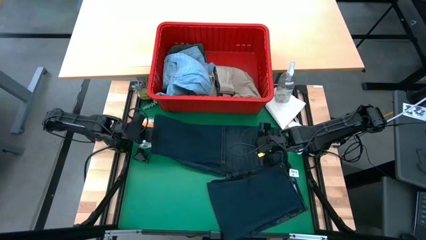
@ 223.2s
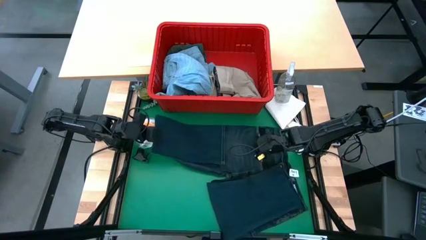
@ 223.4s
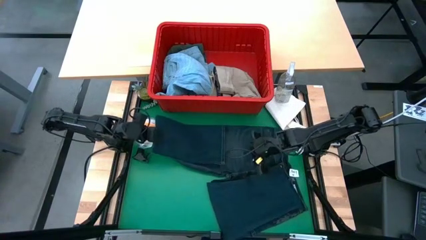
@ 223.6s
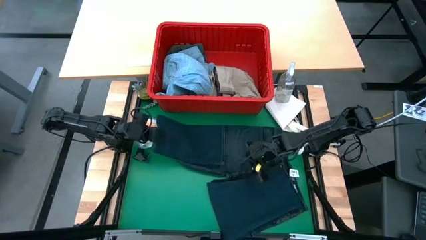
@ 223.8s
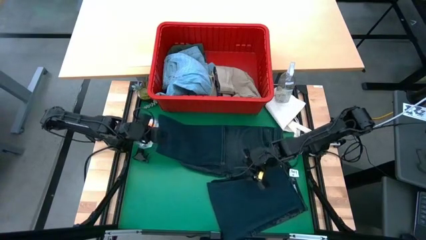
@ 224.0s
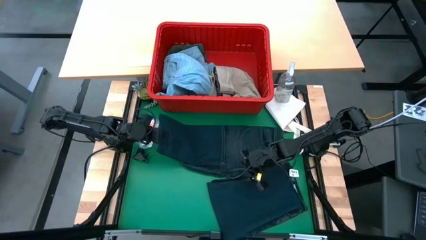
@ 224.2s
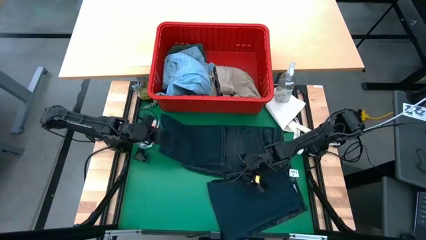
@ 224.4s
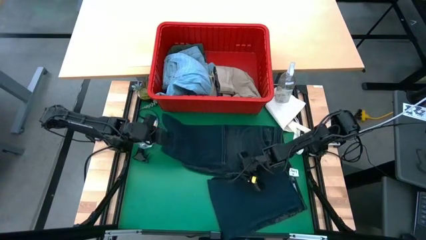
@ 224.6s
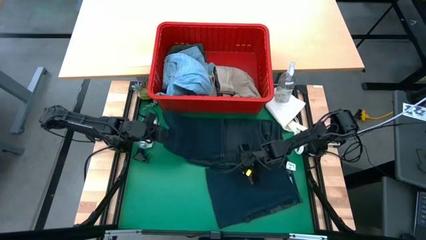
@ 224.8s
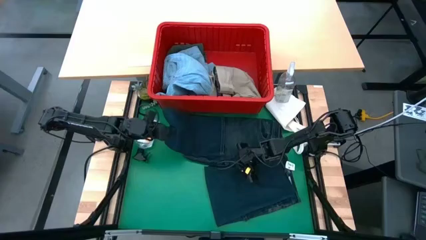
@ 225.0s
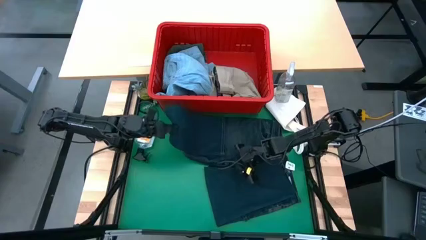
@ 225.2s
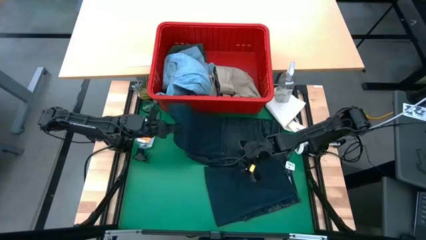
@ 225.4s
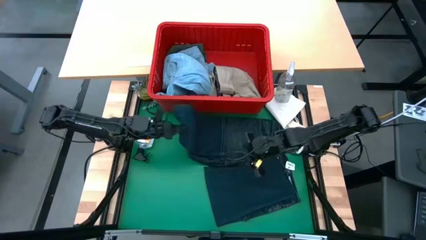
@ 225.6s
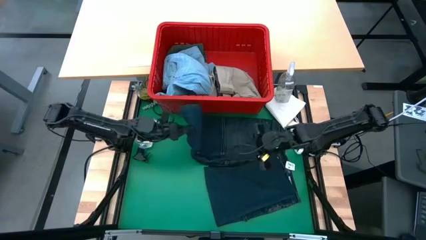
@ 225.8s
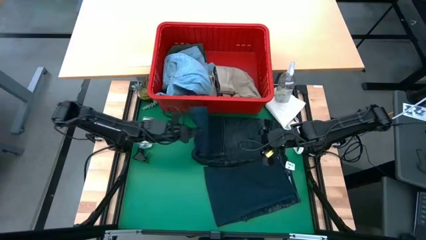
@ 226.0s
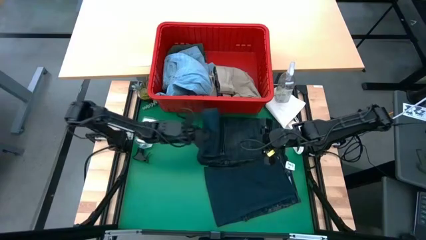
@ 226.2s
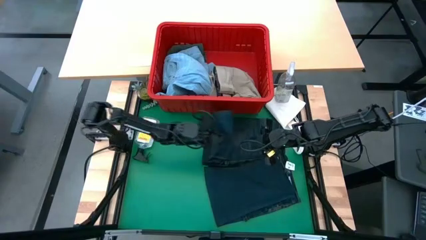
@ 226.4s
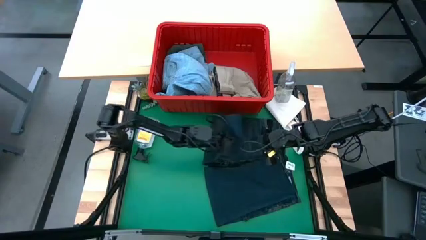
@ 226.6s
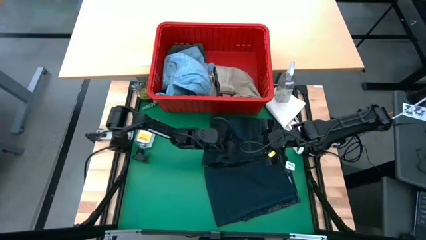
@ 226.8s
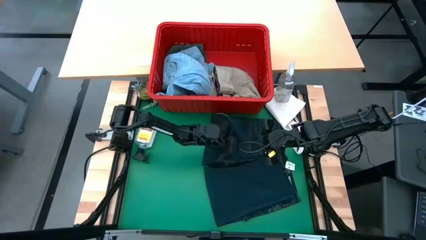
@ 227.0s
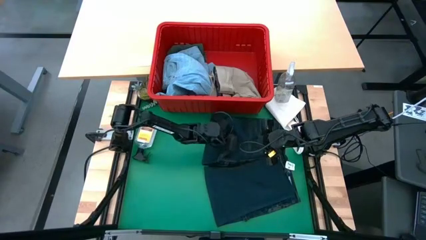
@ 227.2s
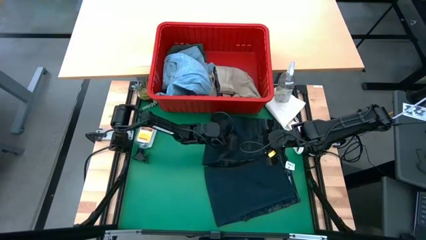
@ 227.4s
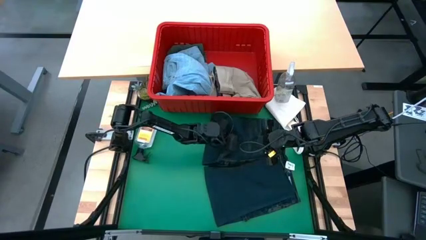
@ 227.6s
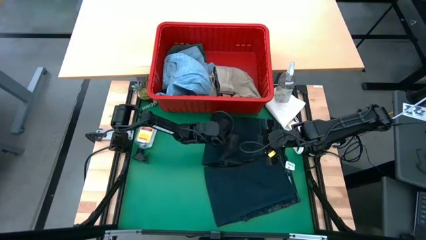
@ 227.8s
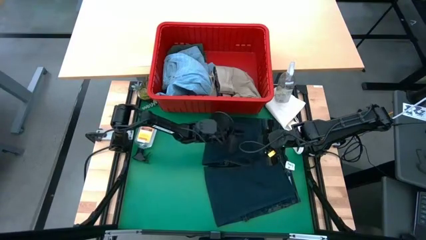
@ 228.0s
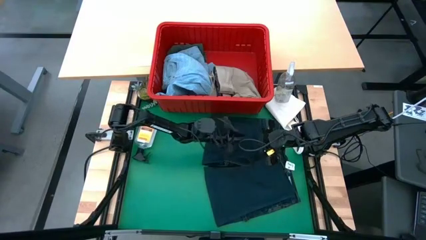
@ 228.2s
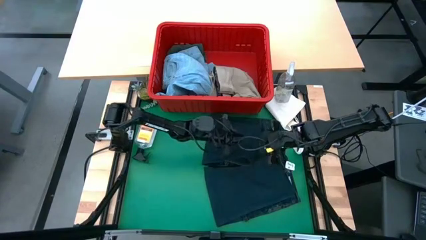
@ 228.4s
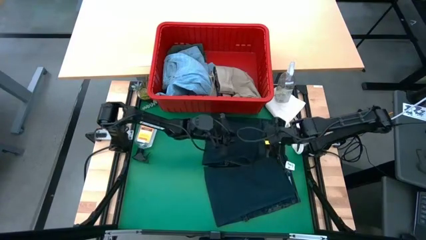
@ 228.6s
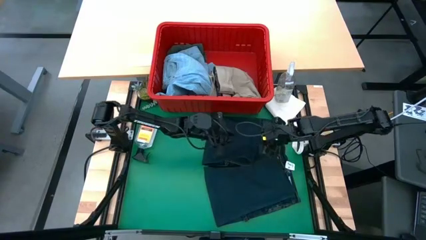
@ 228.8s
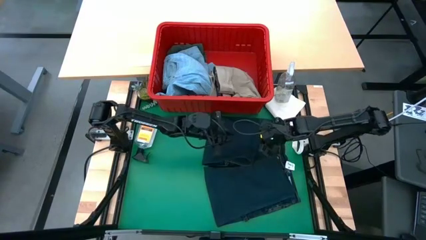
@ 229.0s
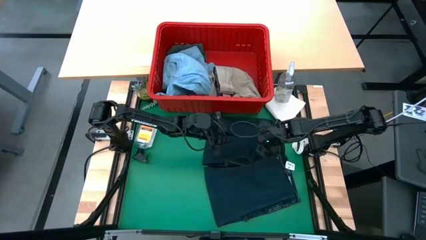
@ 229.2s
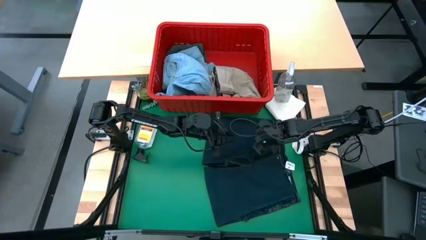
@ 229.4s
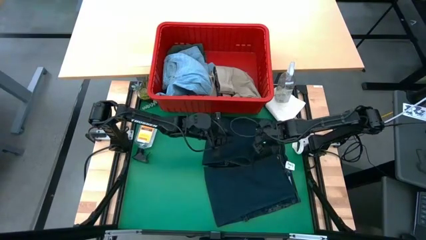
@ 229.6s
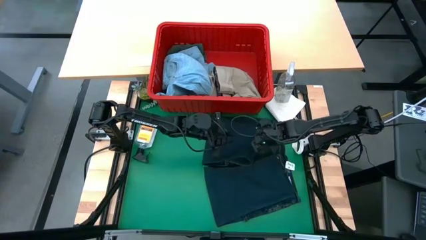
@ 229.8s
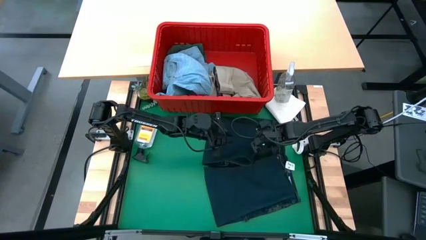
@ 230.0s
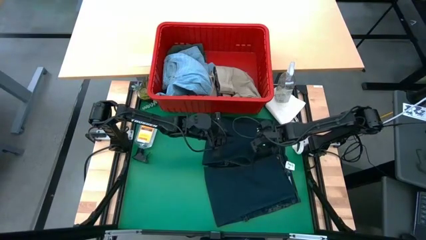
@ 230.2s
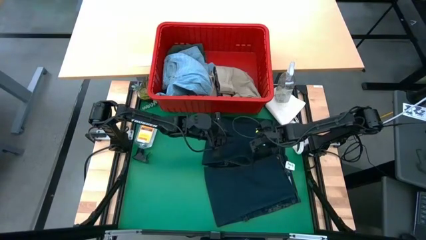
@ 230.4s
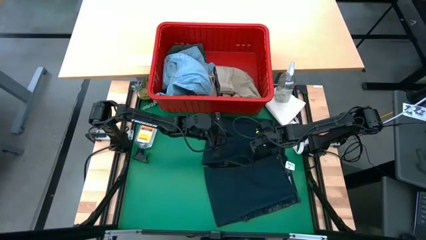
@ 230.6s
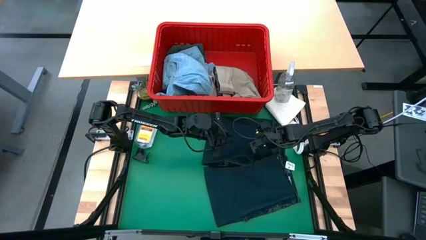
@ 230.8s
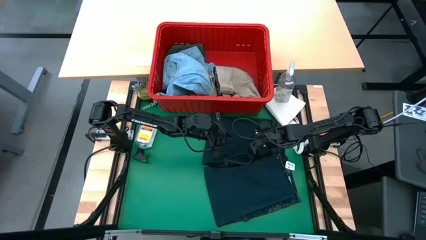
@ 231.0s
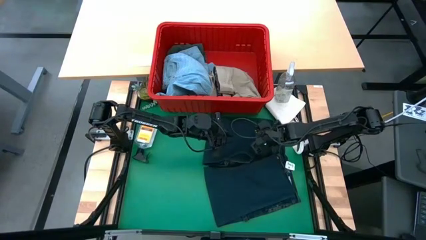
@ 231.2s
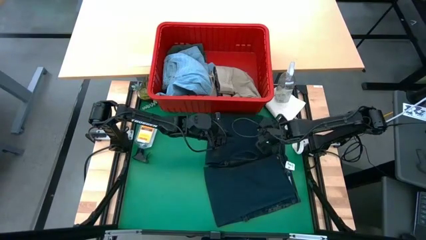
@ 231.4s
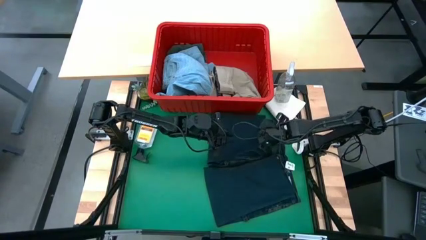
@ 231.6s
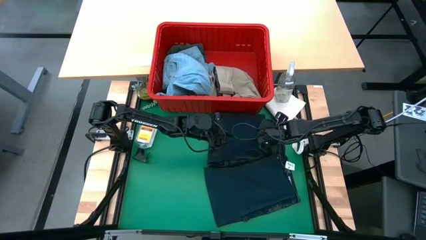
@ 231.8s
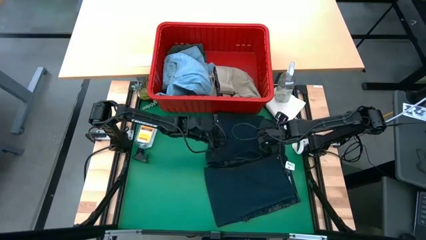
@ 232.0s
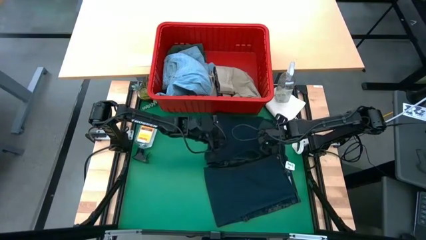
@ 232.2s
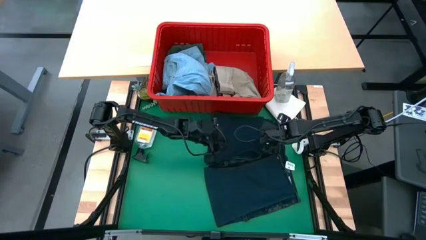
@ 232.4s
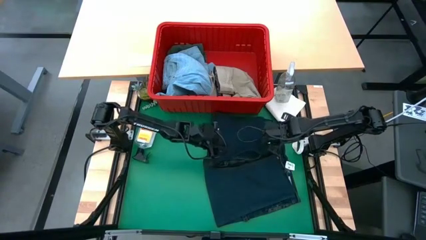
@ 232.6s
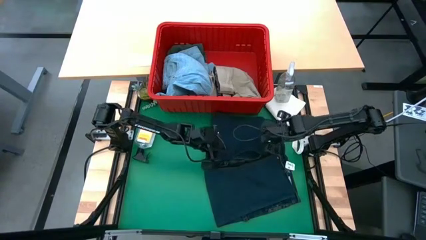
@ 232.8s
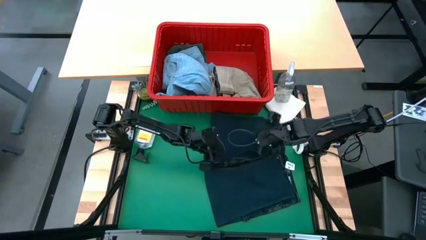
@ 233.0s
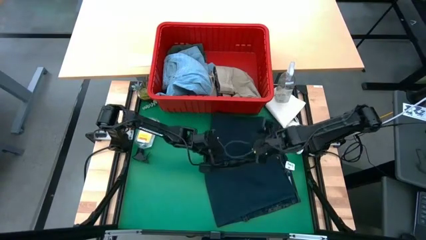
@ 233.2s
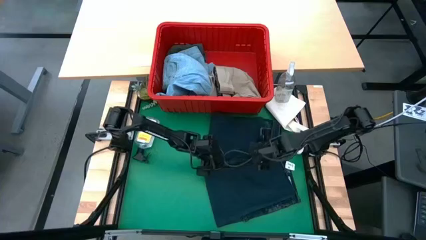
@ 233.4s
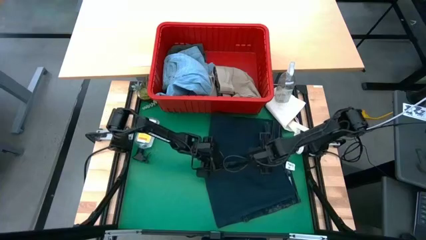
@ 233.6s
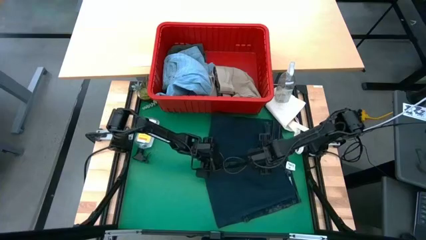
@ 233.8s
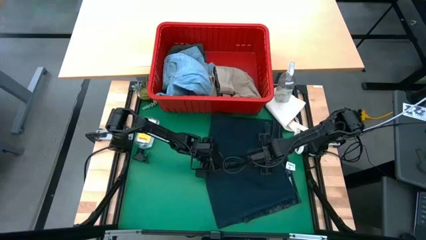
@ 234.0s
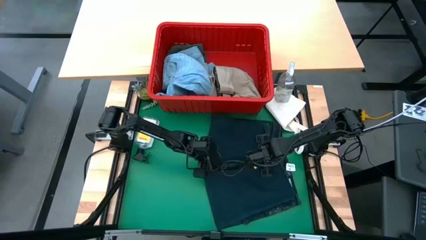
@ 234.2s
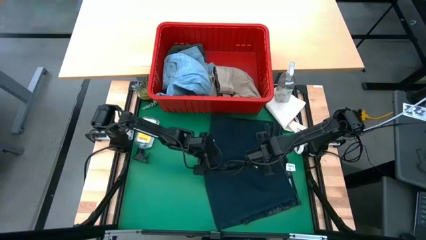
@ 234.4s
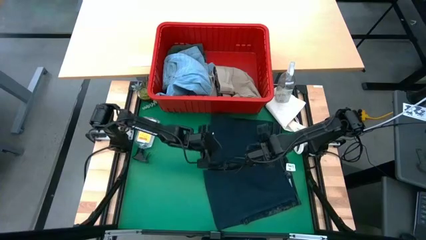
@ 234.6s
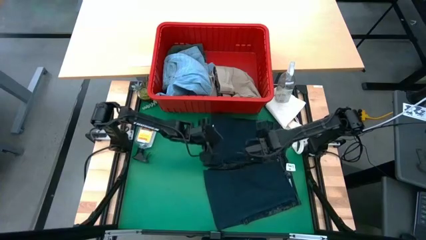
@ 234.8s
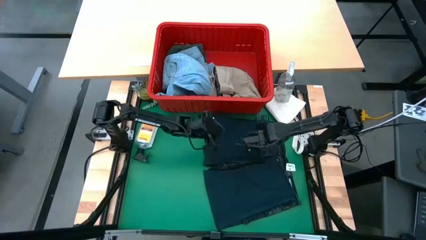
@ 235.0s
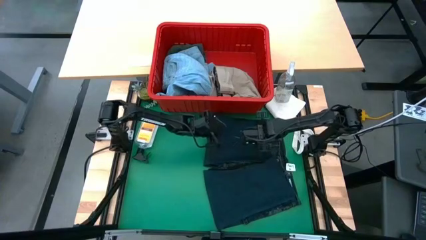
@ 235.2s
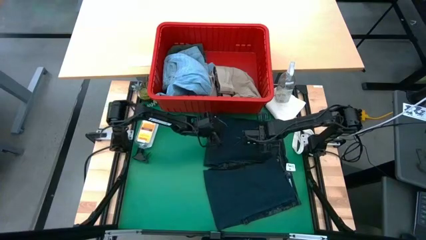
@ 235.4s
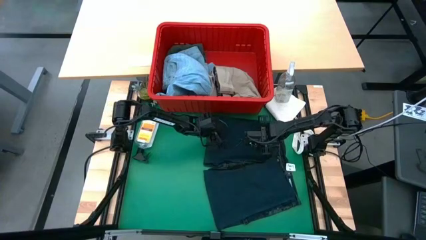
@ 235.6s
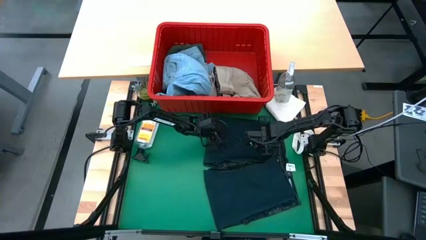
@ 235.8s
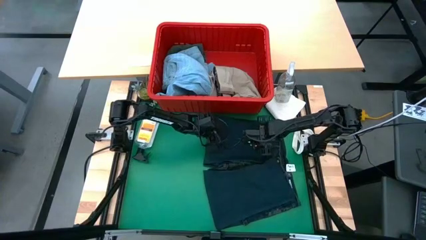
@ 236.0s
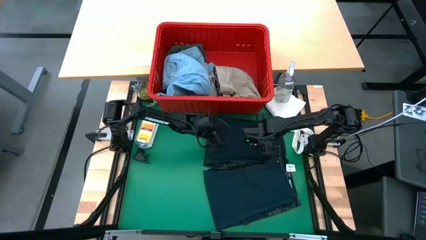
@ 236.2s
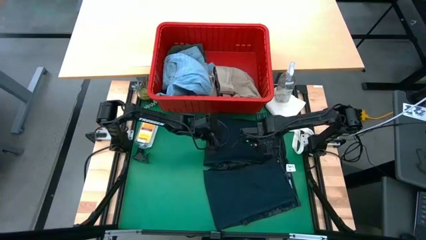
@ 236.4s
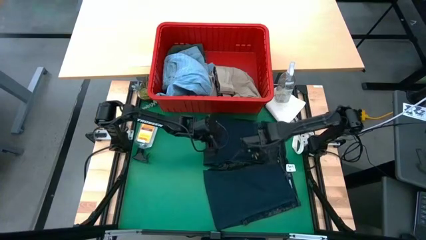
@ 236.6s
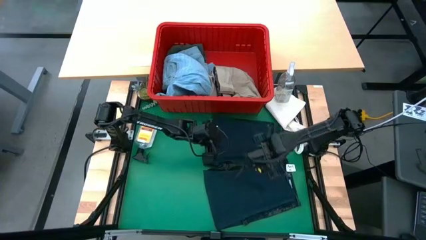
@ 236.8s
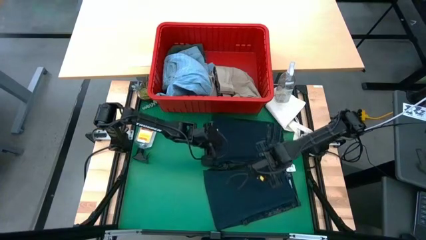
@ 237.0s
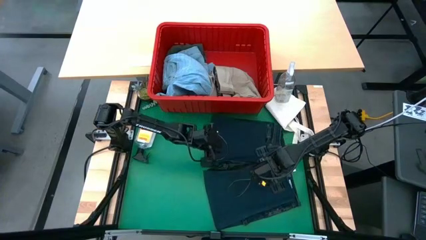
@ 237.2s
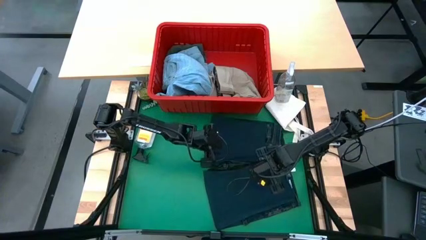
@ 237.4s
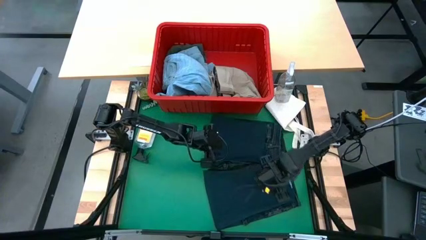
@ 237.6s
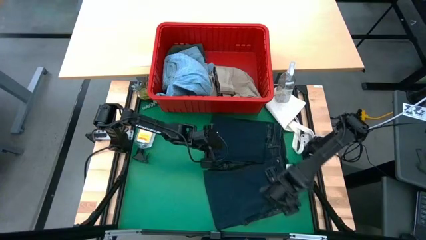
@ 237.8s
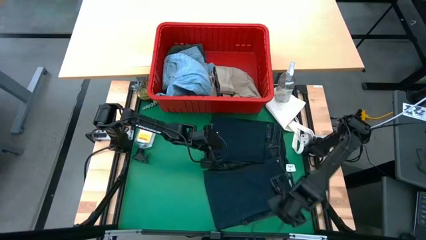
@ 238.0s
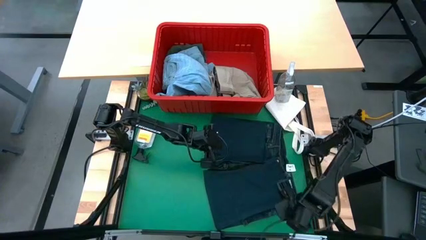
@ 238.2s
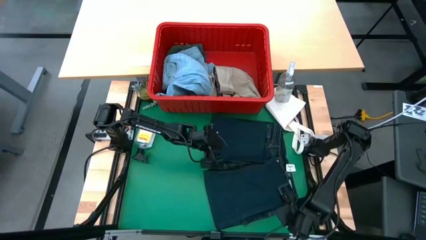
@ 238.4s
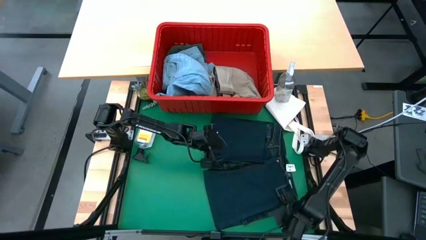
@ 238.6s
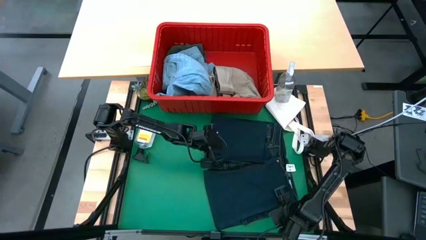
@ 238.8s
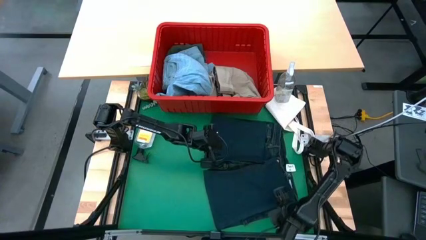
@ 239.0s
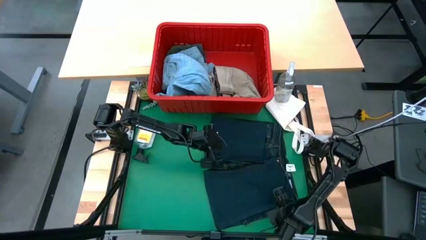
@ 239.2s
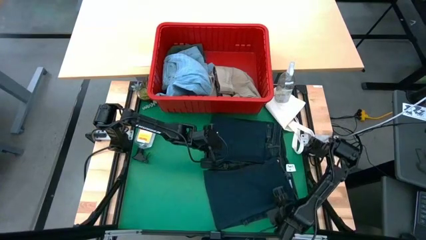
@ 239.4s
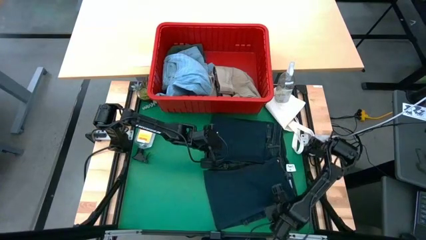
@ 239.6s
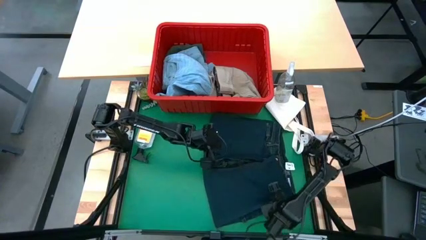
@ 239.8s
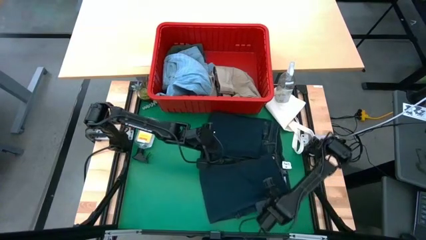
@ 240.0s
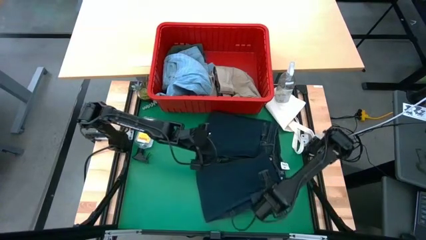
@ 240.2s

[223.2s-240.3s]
Task: Fold laundry
Fold the dark blue jeans
